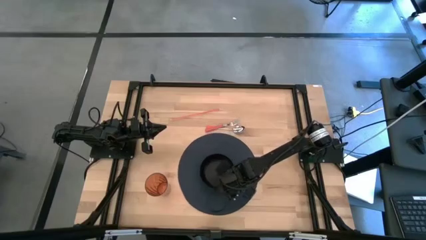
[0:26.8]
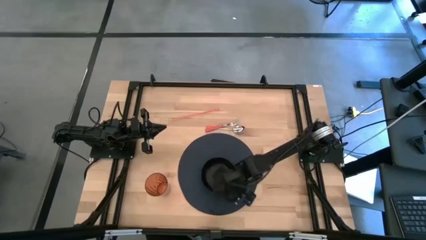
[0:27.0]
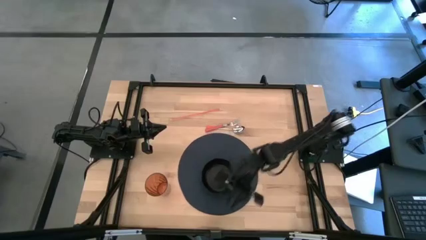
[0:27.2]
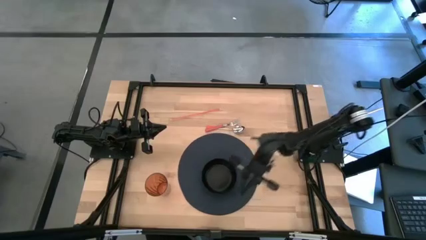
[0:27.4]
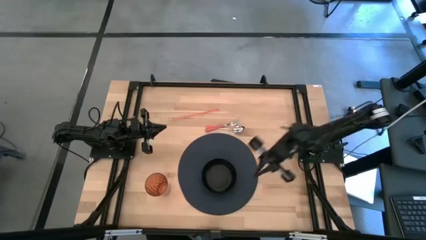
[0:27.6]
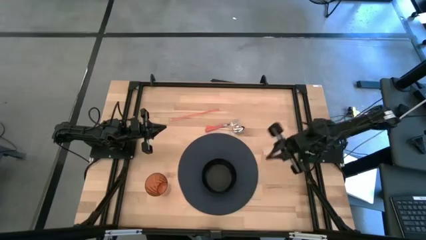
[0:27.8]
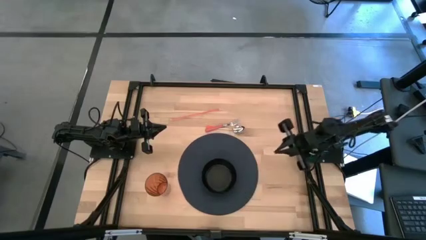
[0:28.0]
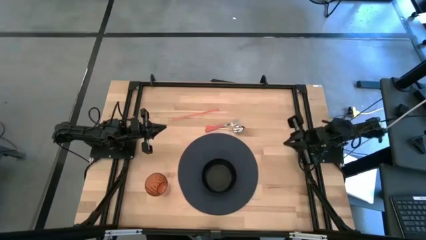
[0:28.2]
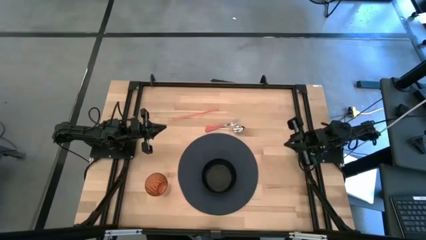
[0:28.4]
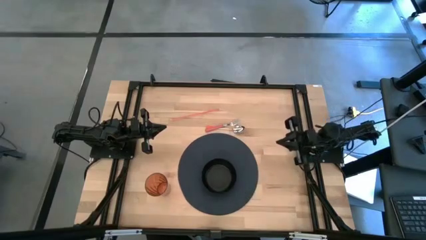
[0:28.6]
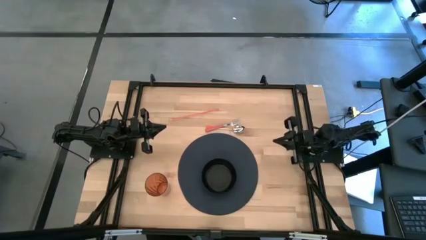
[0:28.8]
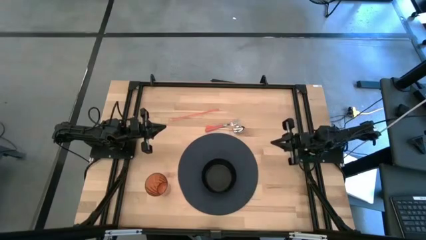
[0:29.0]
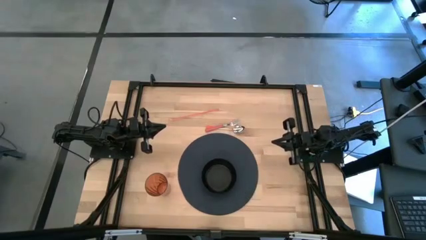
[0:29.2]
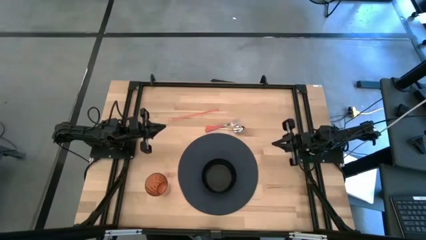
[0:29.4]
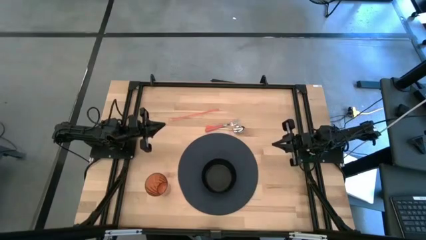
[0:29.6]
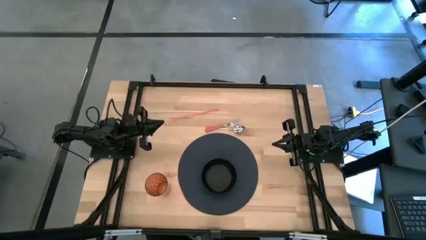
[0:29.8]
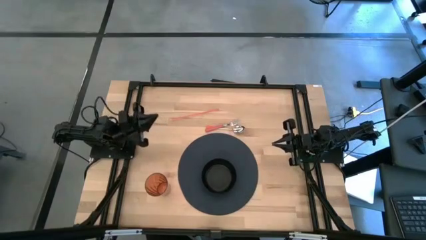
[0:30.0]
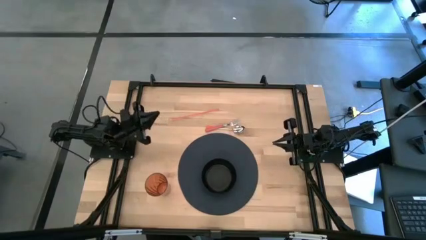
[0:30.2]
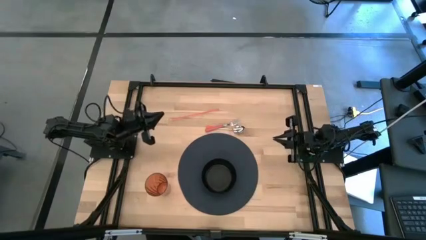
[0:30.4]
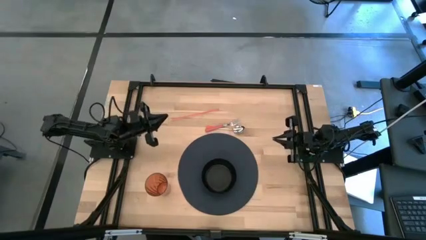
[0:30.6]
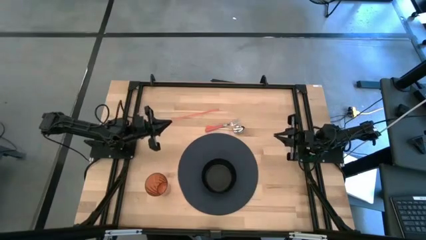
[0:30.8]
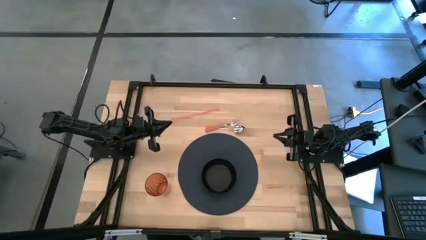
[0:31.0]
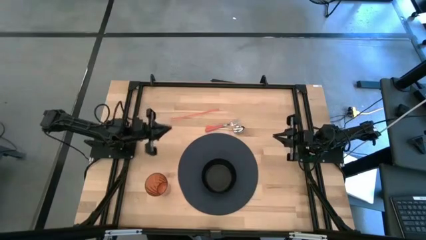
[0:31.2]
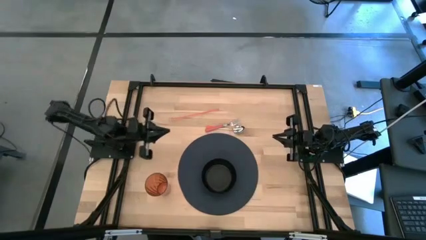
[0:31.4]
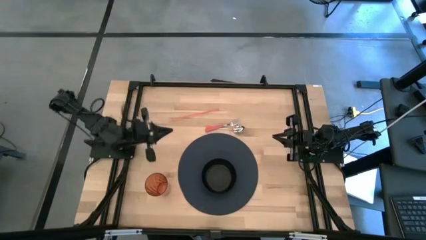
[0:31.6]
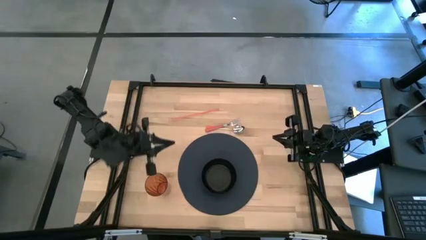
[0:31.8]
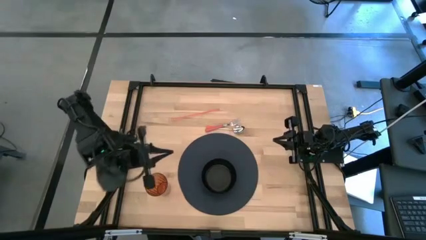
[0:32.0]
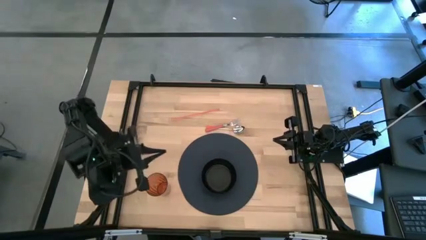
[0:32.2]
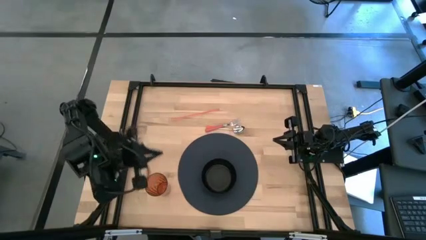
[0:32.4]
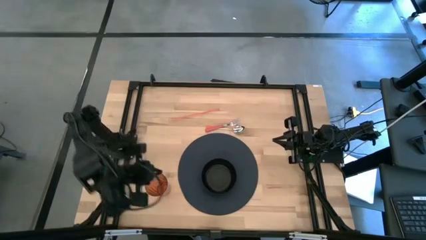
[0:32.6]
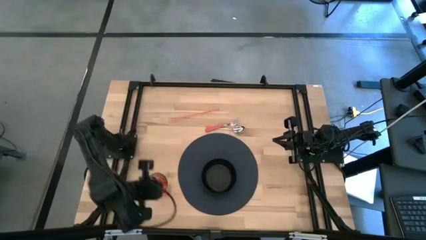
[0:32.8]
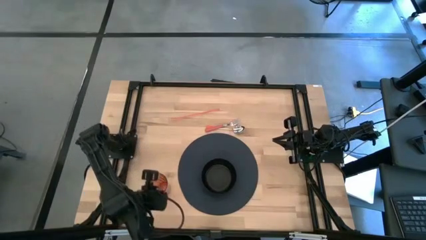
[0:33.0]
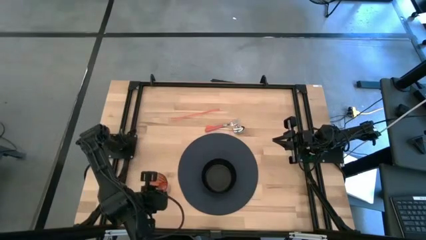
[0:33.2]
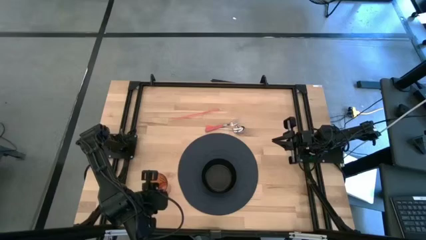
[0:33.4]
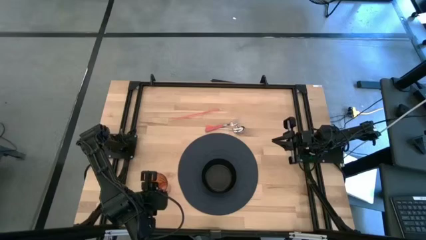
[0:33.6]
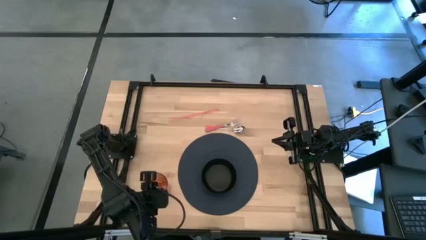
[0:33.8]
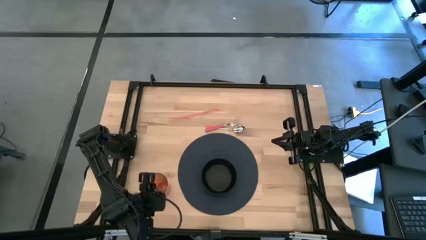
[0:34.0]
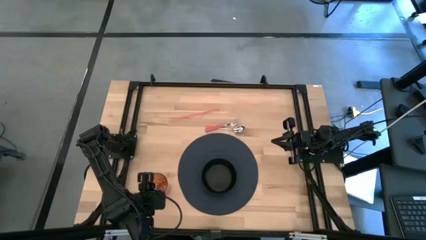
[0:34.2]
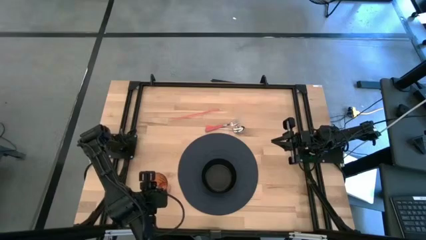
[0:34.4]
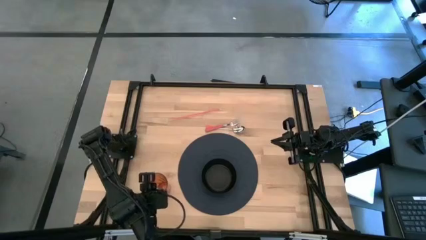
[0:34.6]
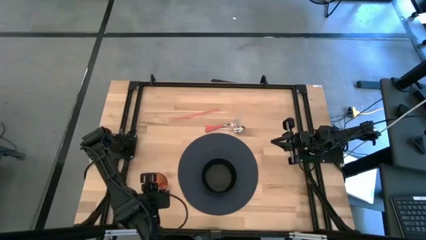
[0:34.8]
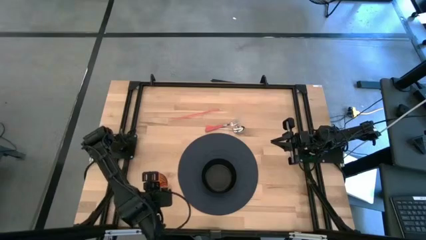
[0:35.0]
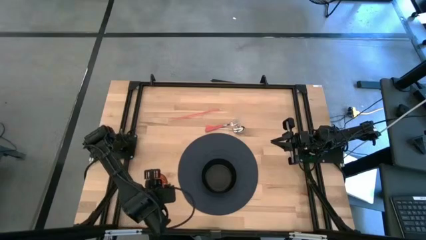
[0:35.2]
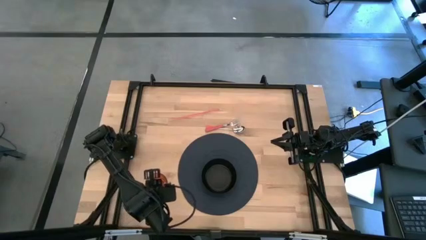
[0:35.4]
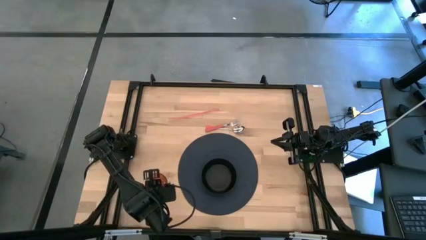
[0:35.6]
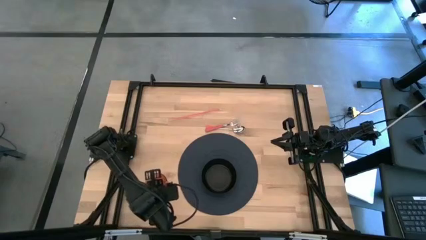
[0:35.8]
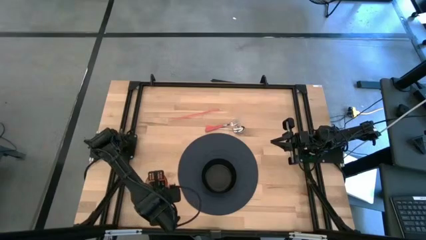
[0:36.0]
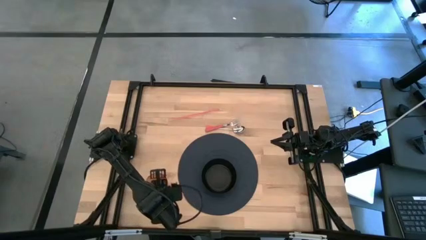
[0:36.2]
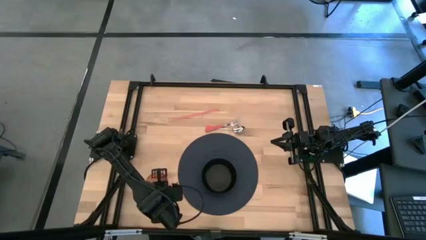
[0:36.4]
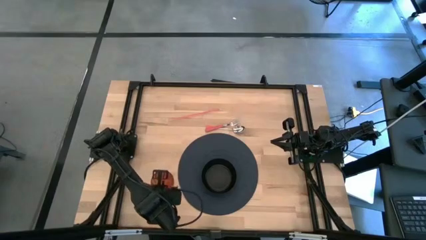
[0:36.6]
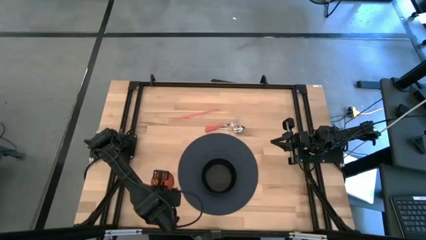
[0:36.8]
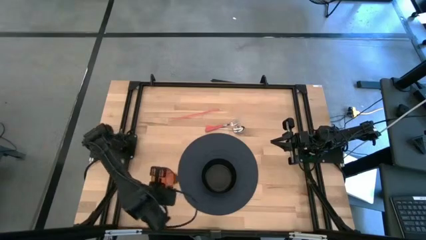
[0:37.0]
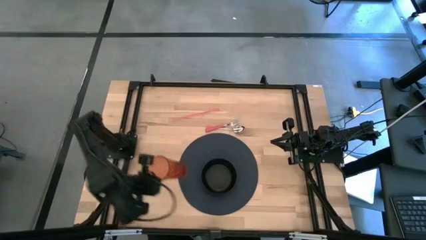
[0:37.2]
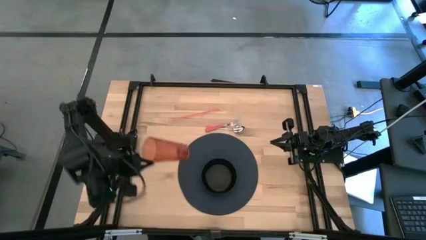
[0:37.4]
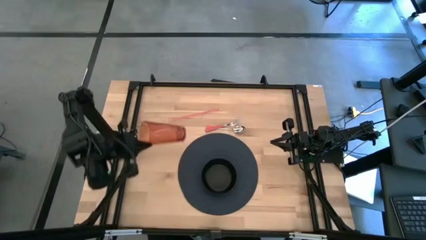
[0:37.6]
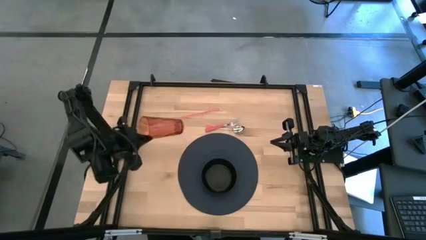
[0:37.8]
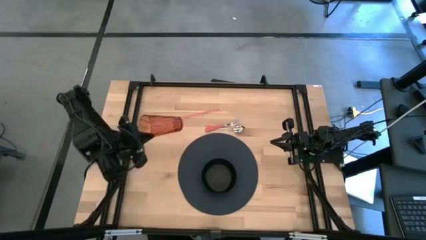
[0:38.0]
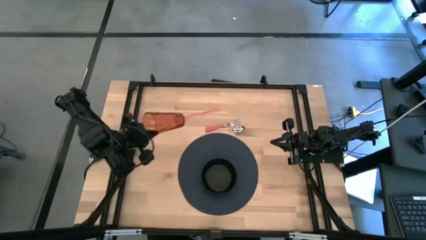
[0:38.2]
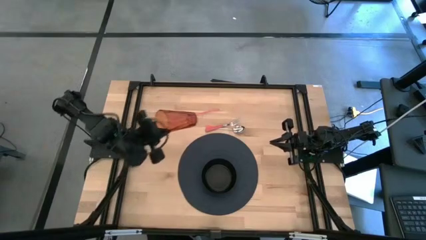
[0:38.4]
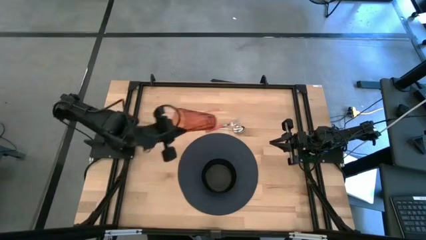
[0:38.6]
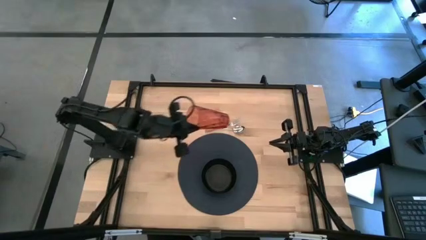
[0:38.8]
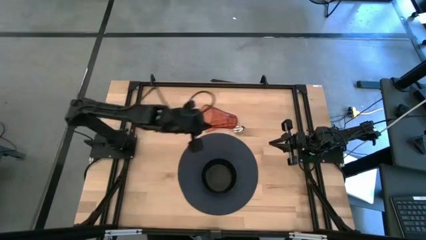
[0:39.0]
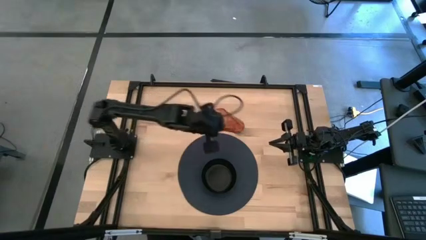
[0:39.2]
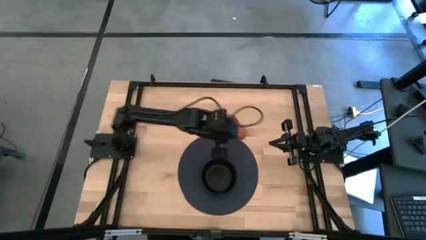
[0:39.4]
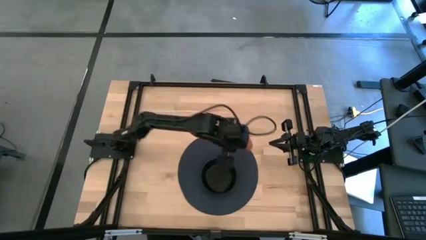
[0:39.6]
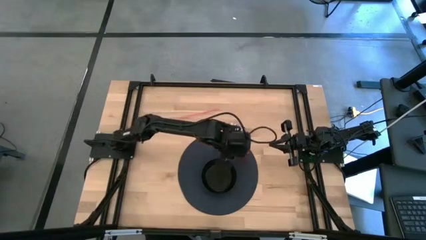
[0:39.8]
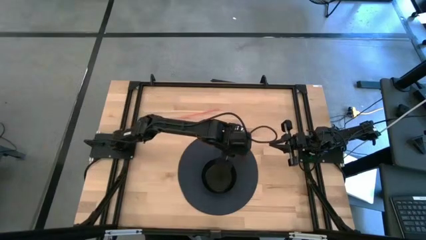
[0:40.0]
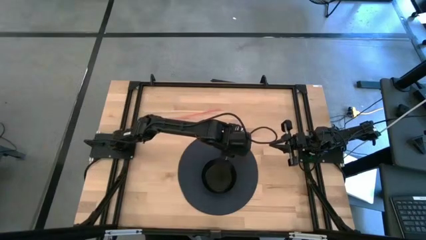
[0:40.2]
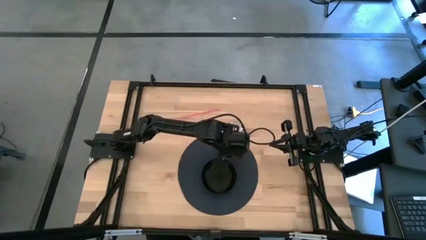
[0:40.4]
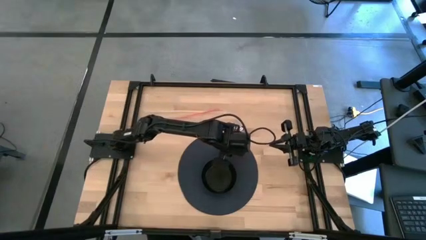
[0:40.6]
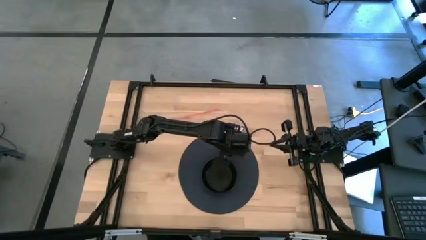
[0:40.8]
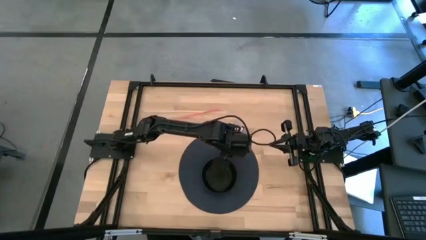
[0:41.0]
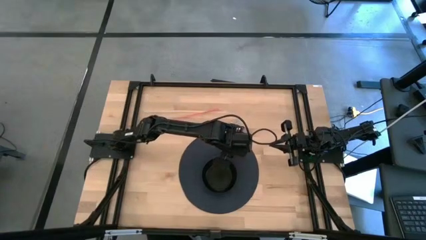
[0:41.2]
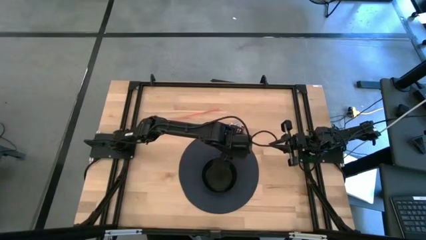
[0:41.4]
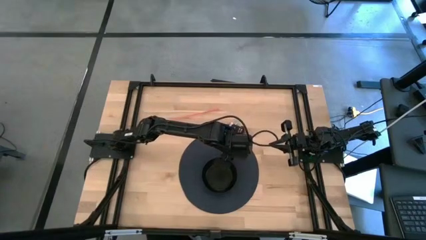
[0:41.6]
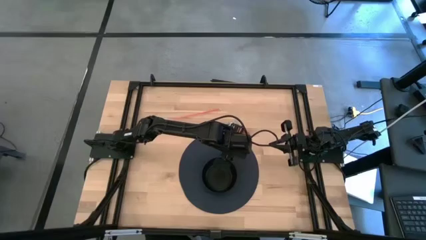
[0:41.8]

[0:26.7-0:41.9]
Task: Pick & Place Utensil
Put the red cup on the blue mat to the top right of the black bowl
